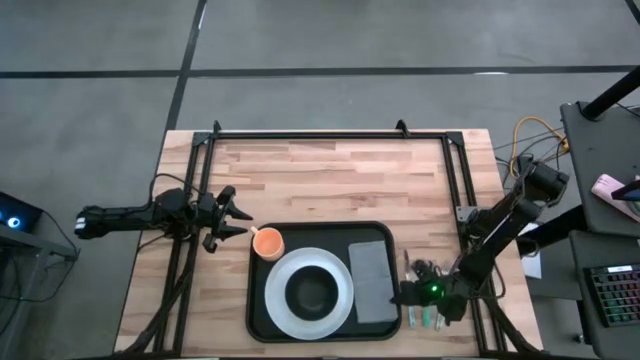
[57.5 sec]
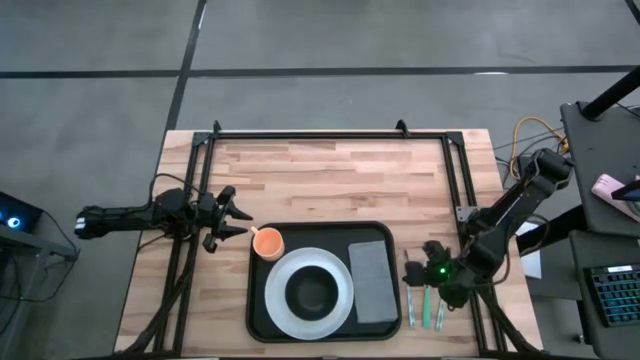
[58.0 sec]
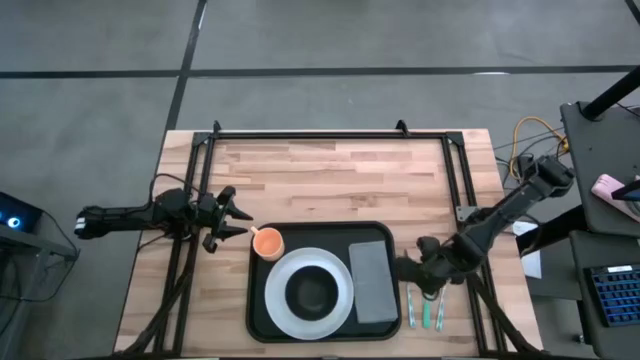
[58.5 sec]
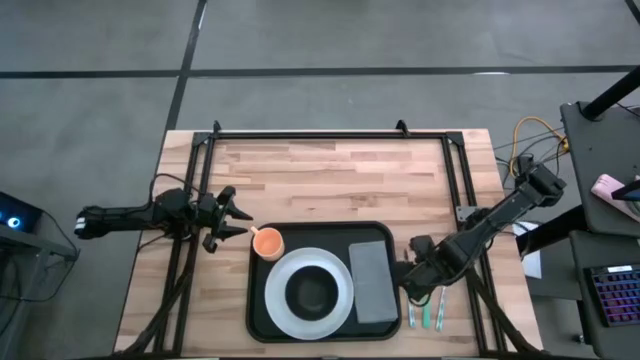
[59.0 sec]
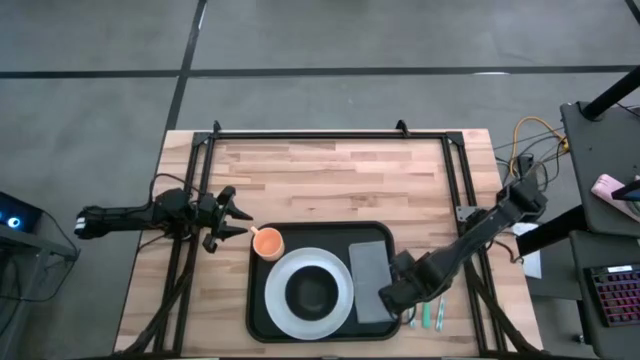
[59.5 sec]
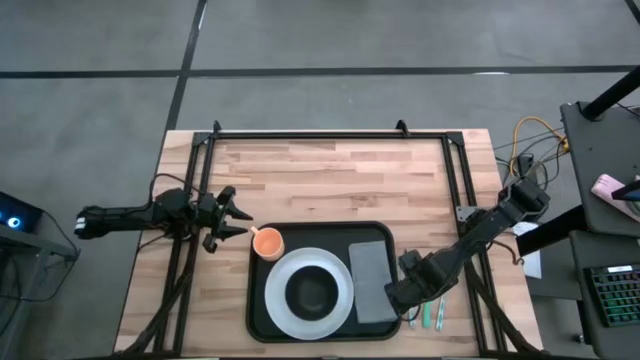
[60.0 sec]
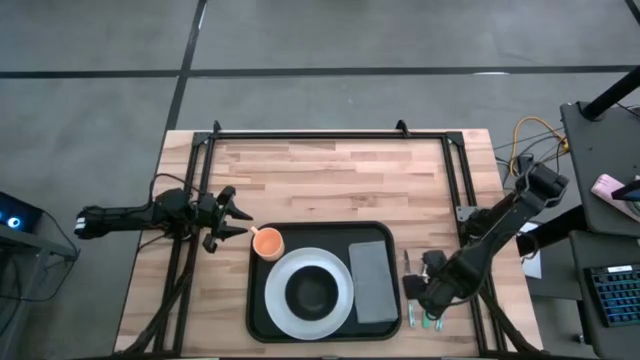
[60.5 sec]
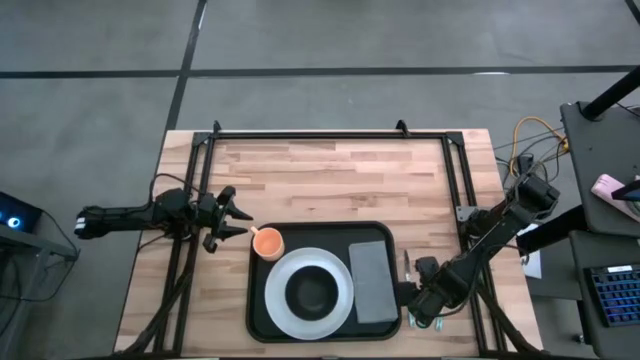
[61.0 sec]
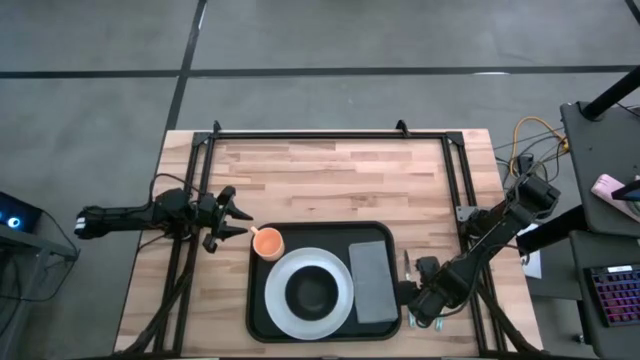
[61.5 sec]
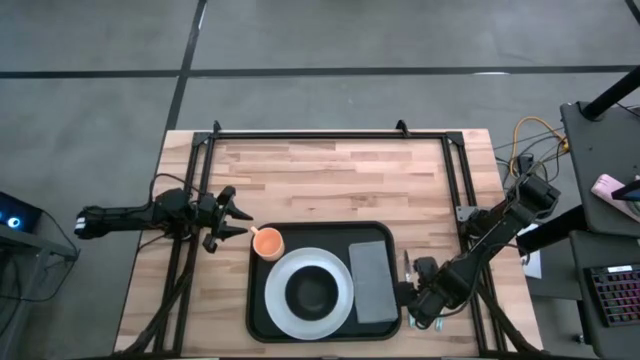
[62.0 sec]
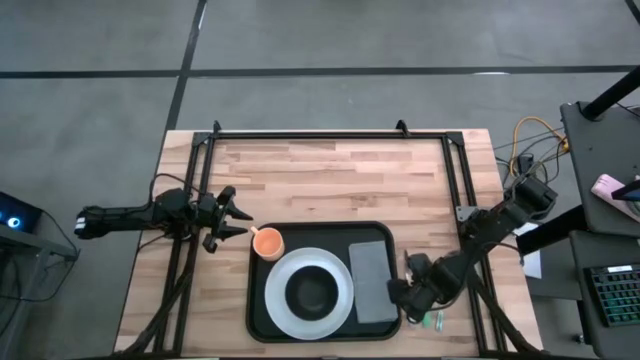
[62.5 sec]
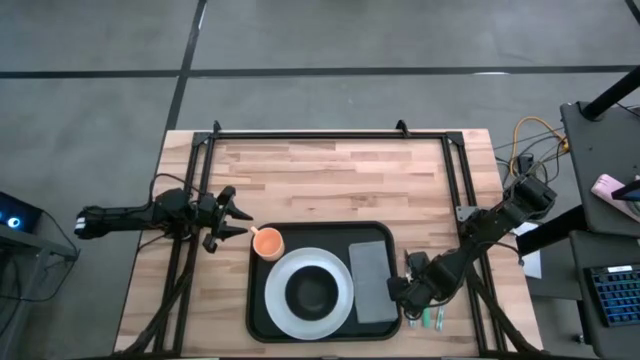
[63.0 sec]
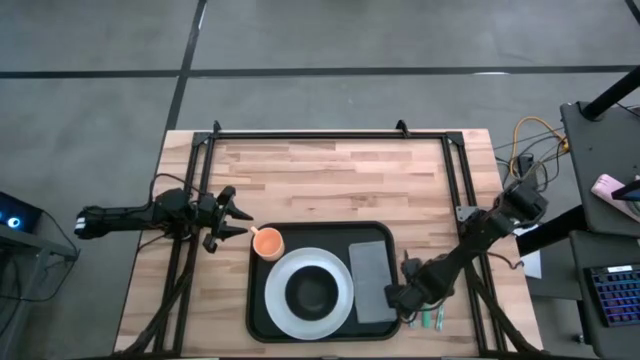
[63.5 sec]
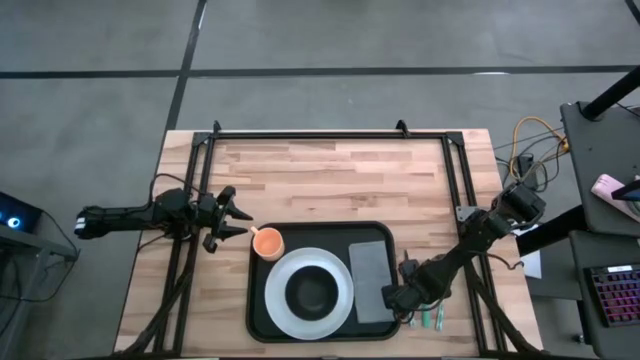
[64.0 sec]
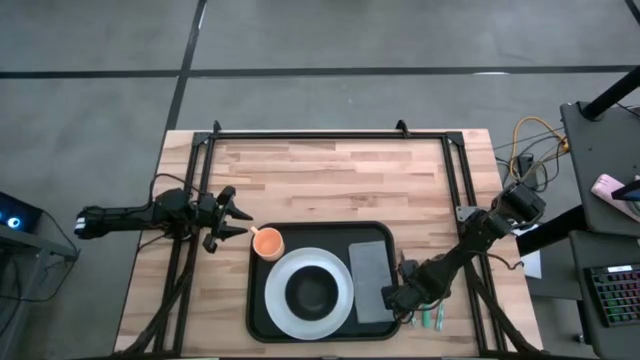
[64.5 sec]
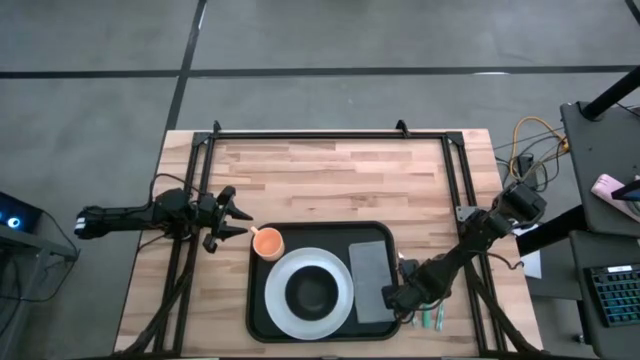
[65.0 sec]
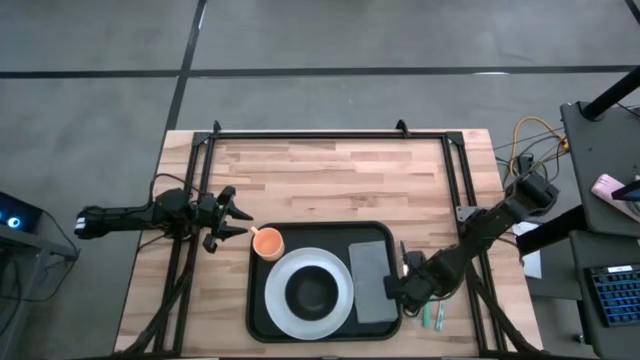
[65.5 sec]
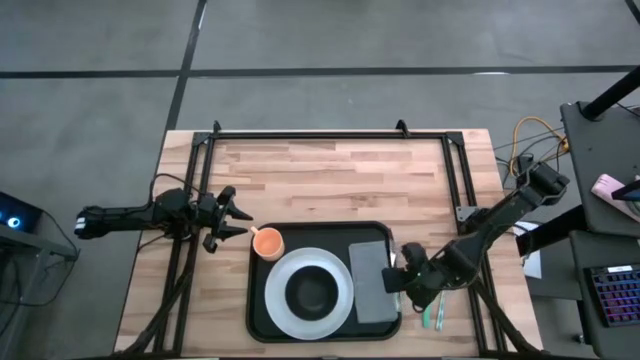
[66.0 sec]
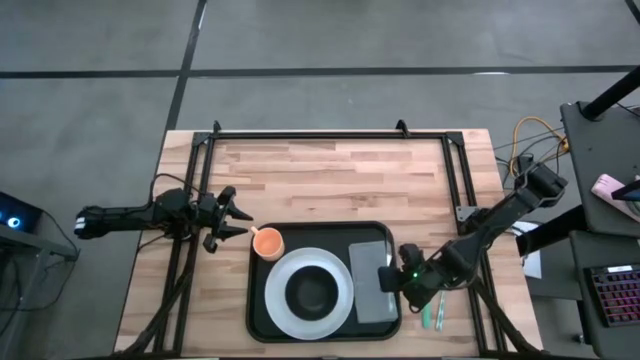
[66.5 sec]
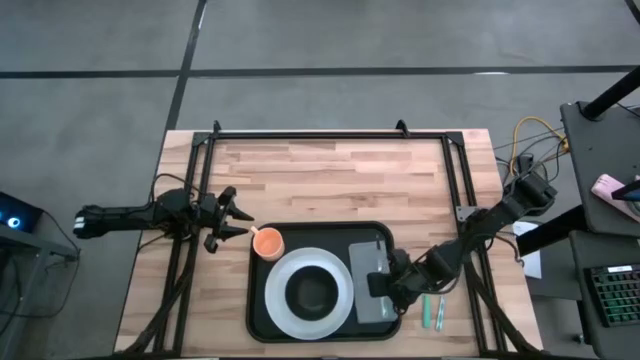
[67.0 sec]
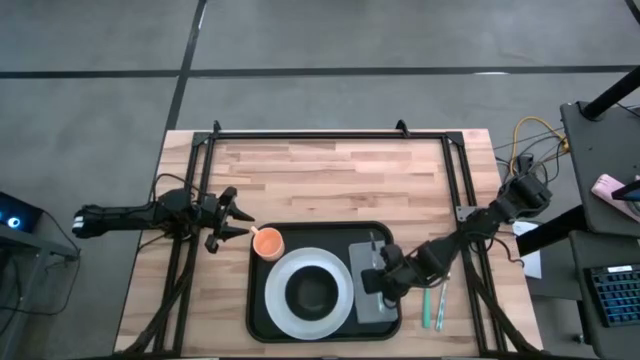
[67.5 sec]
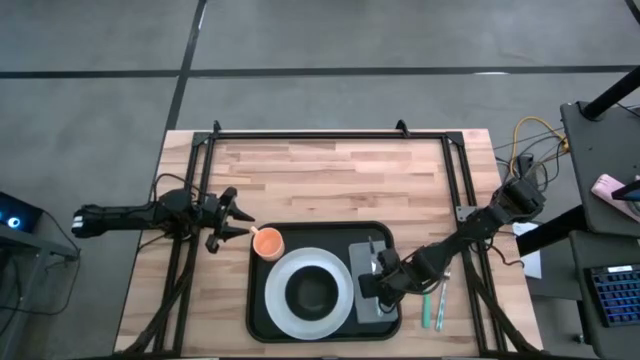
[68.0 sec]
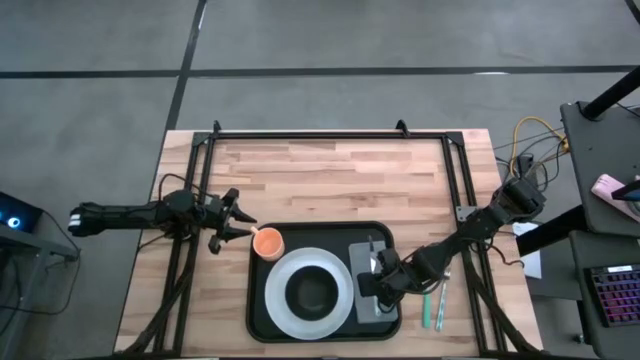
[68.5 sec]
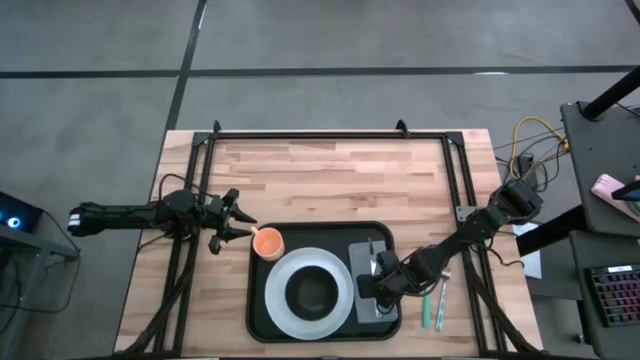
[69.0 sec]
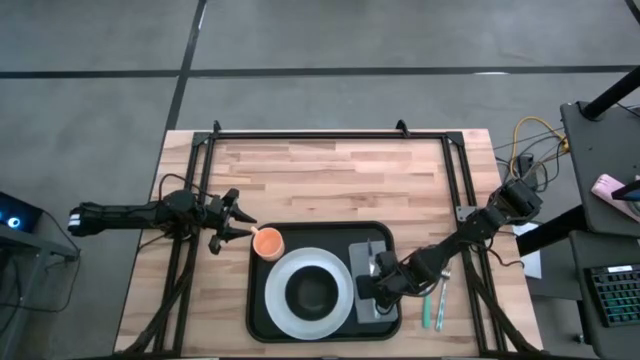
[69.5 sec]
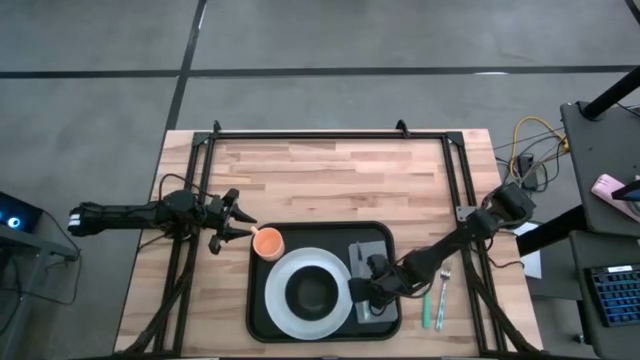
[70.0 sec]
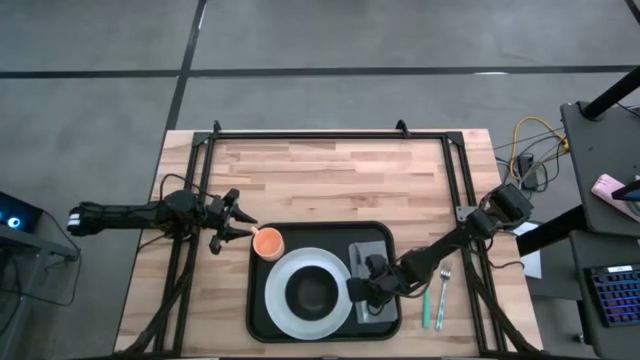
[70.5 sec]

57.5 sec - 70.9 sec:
Task: Set up tray
Put the green knife on the gray napkin on the black tray

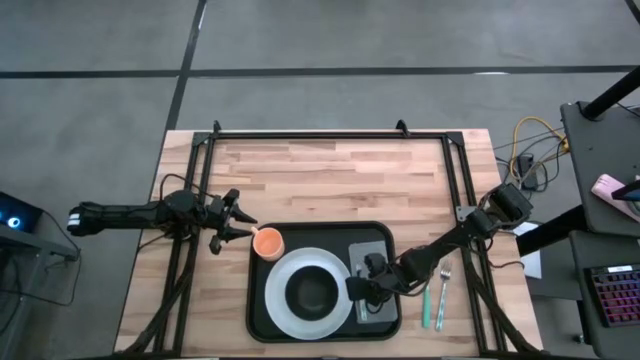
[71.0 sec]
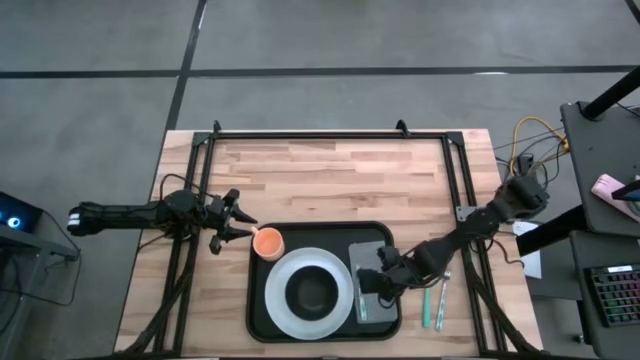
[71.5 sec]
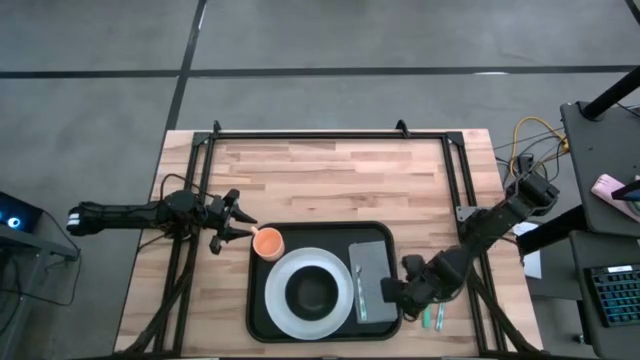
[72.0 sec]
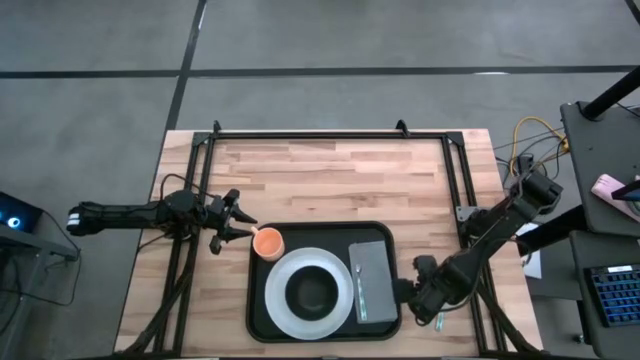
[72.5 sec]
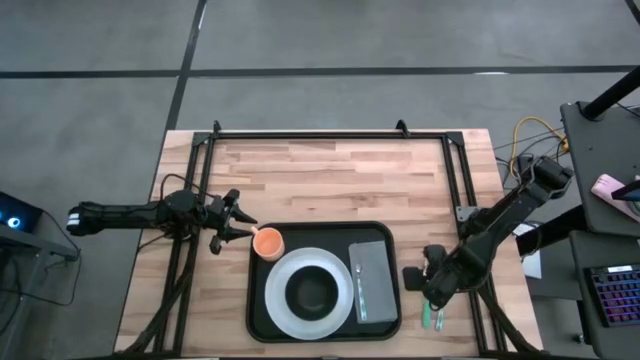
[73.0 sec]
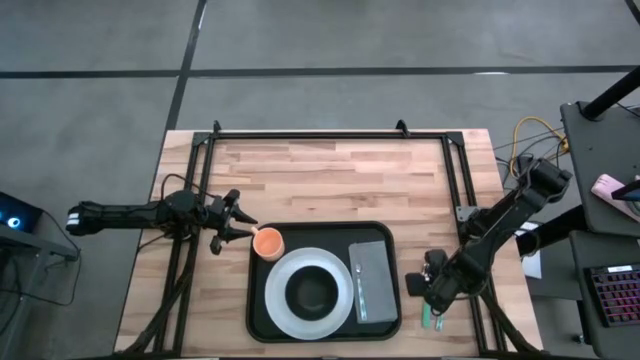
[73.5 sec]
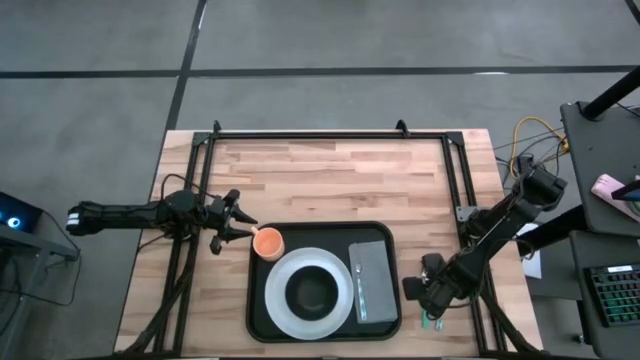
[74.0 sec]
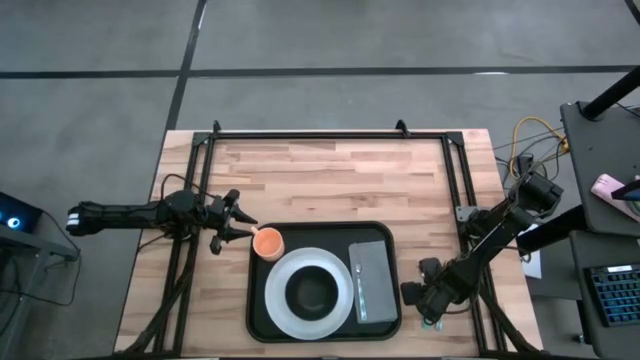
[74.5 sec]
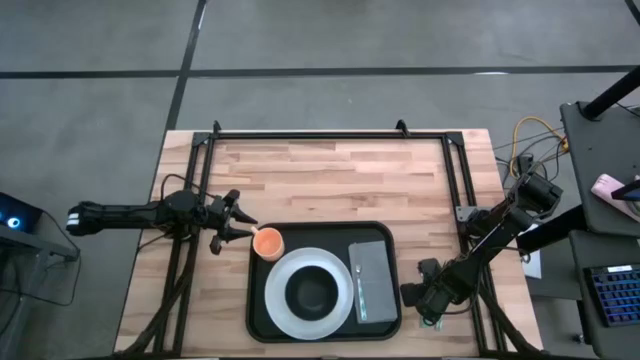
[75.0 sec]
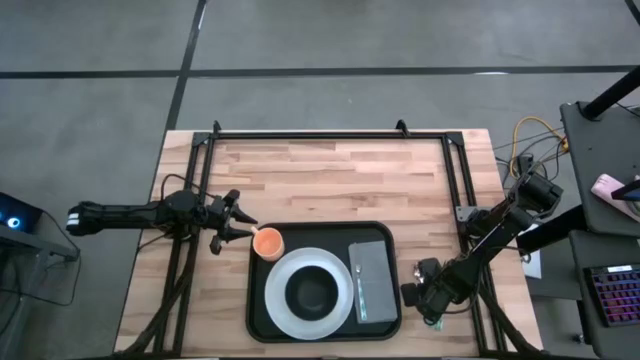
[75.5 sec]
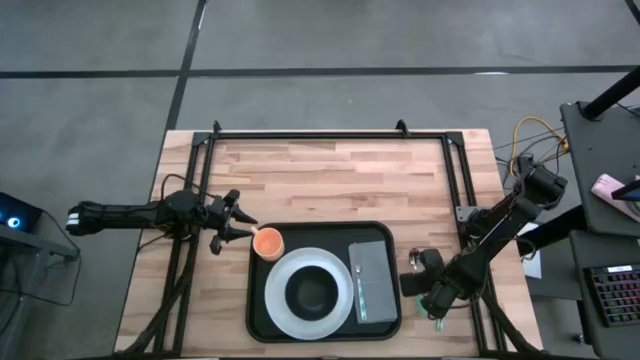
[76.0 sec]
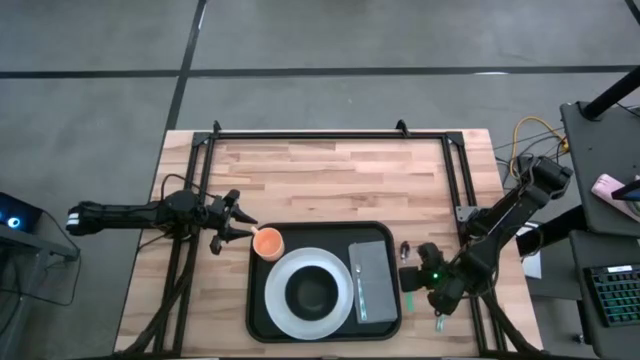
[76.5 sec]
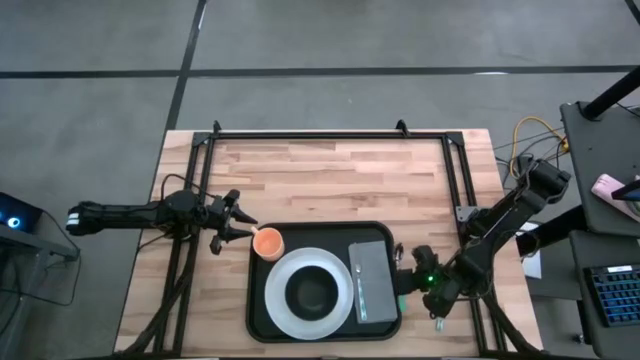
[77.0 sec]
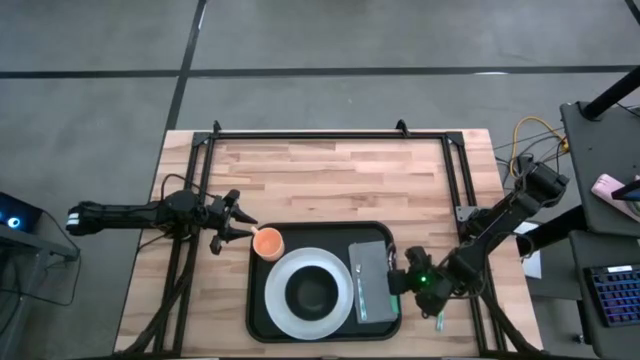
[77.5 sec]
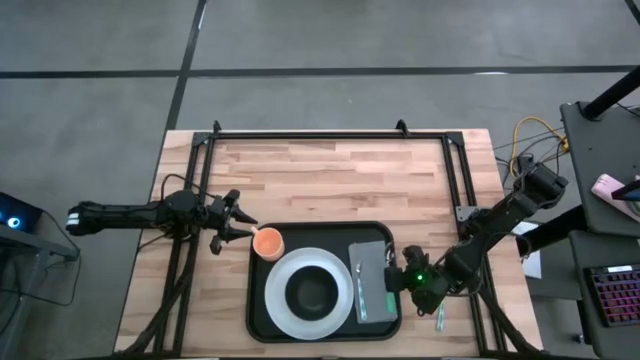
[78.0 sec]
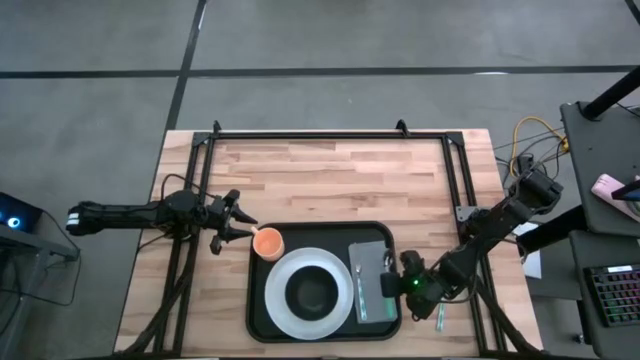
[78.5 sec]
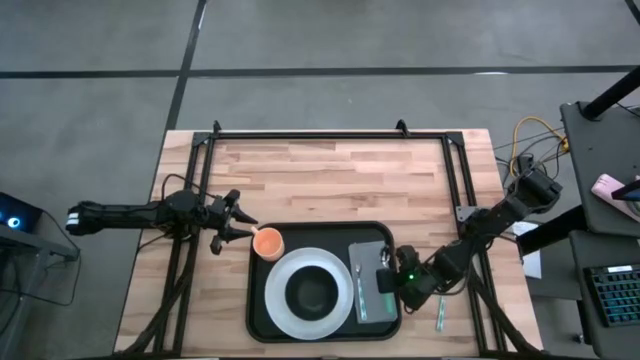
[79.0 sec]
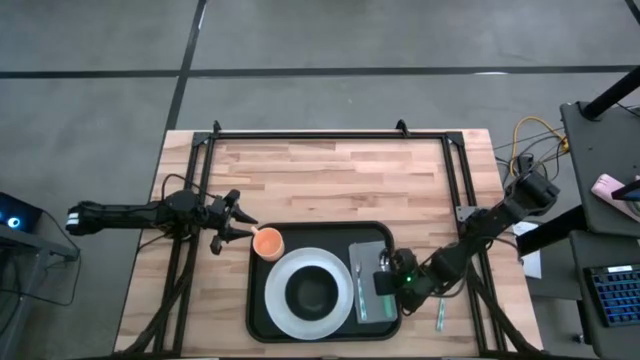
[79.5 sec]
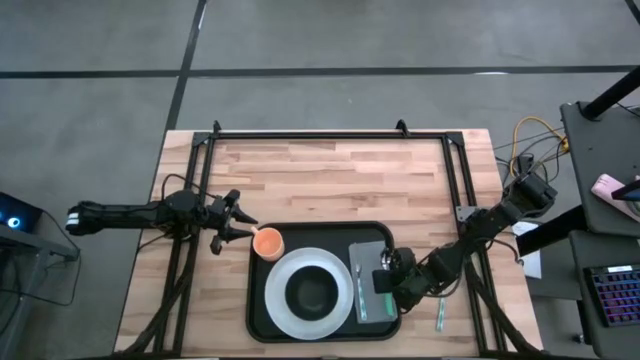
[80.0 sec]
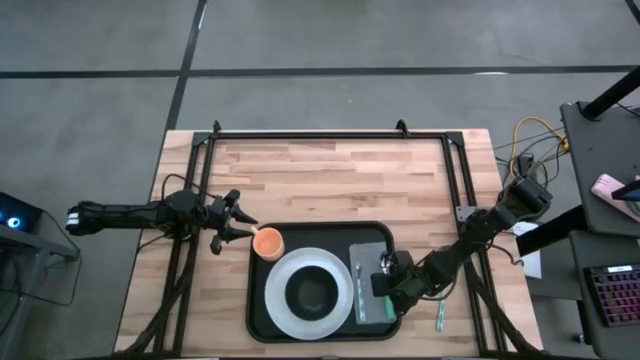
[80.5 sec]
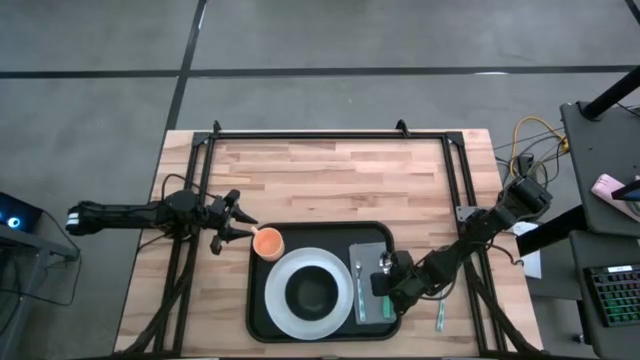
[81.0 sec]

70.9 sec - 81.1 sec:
Put the green spoon to the right of the green knife on the gray napkin on the black tray
